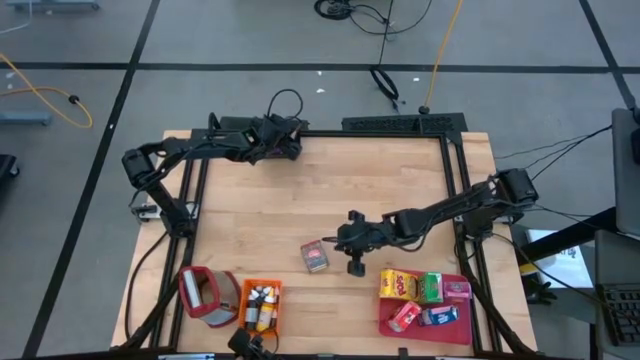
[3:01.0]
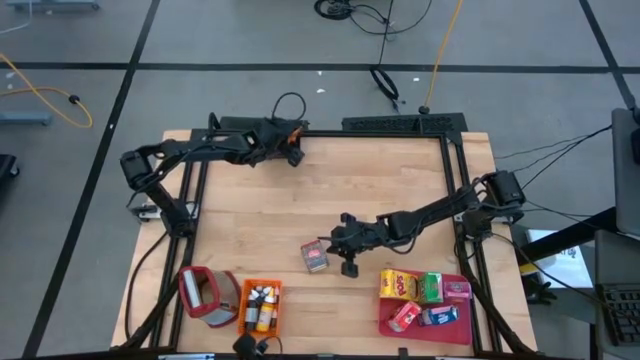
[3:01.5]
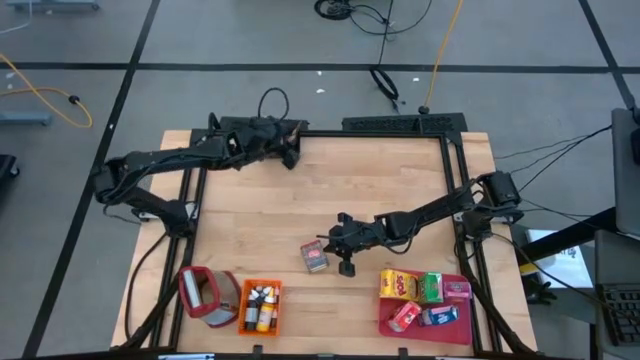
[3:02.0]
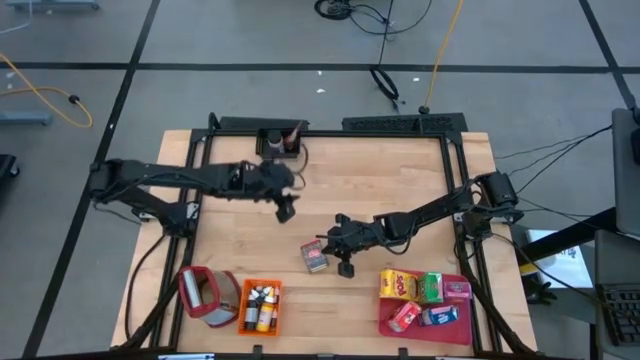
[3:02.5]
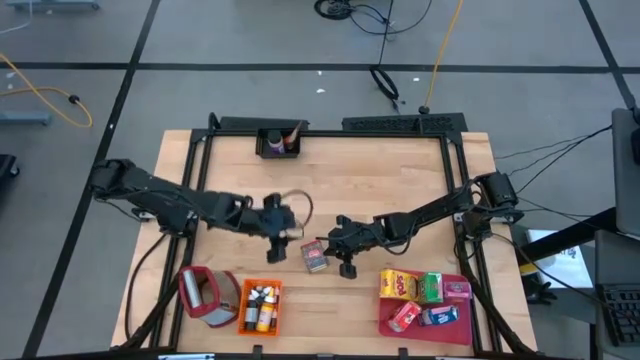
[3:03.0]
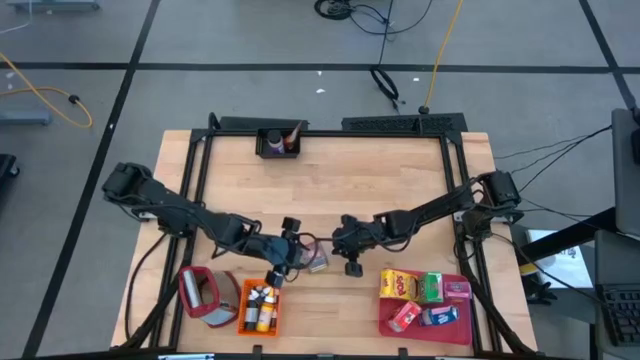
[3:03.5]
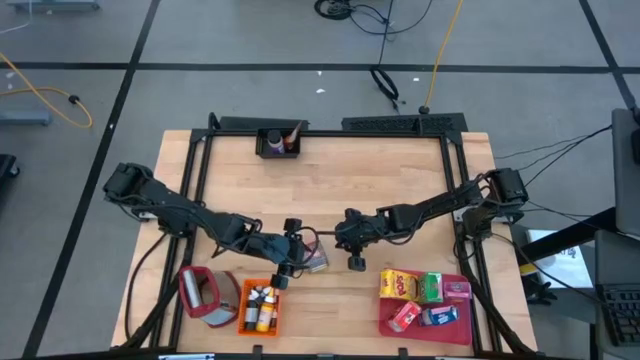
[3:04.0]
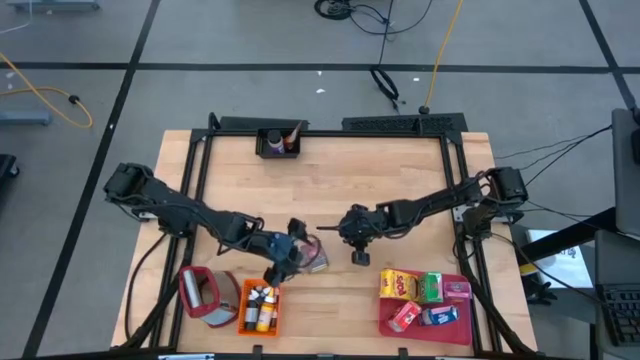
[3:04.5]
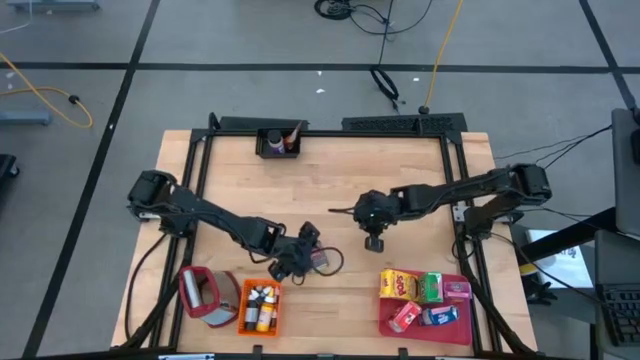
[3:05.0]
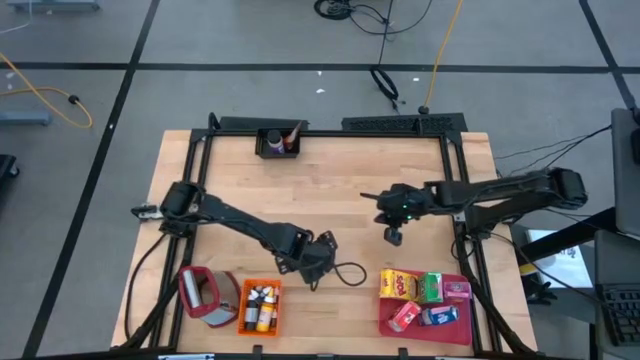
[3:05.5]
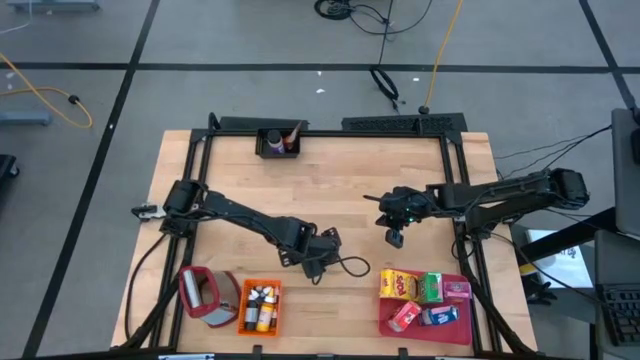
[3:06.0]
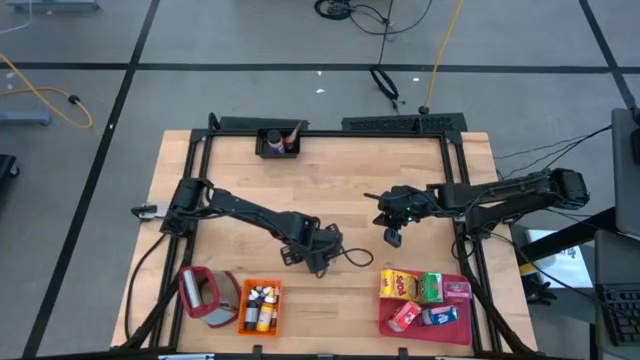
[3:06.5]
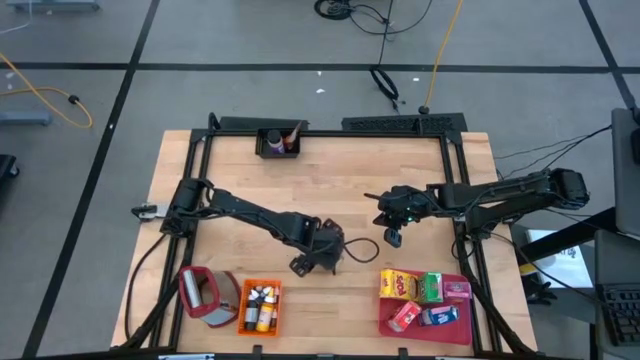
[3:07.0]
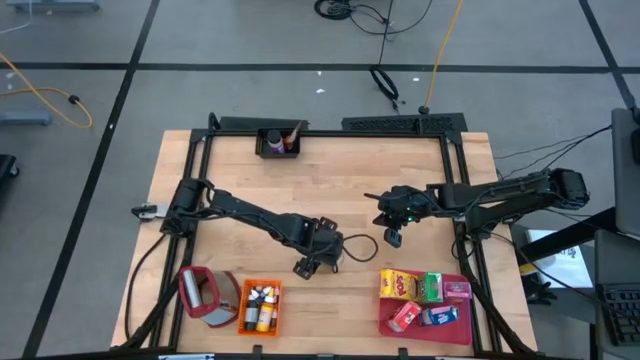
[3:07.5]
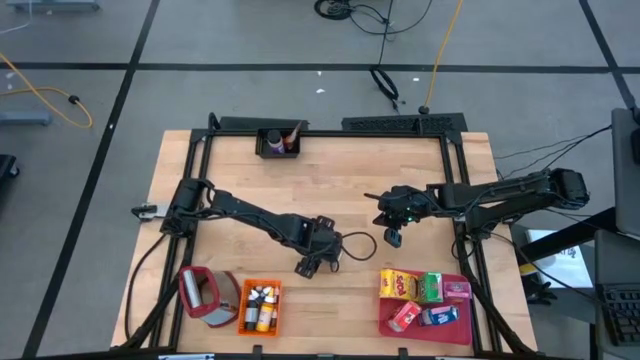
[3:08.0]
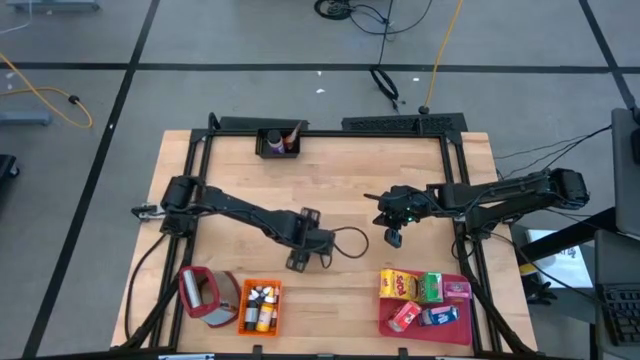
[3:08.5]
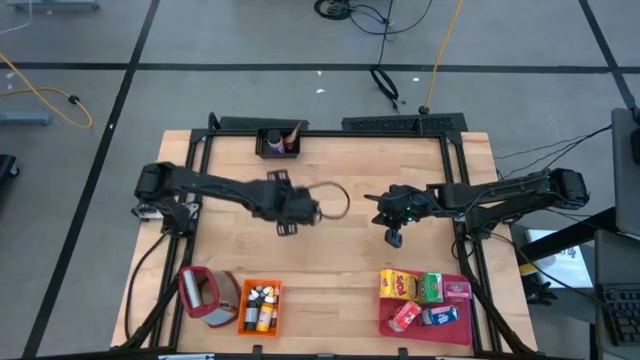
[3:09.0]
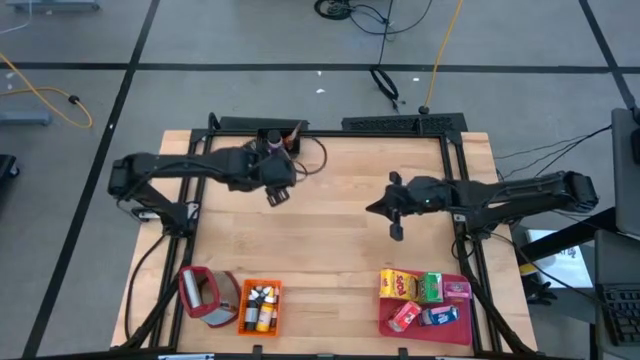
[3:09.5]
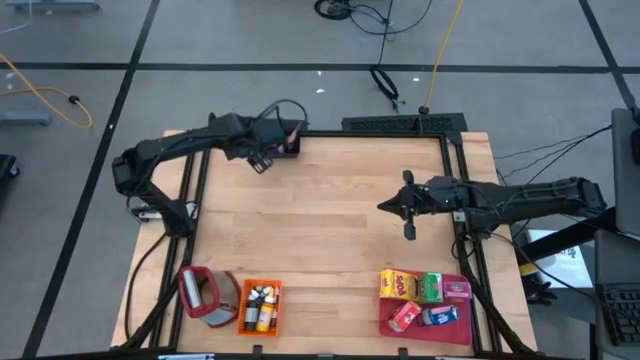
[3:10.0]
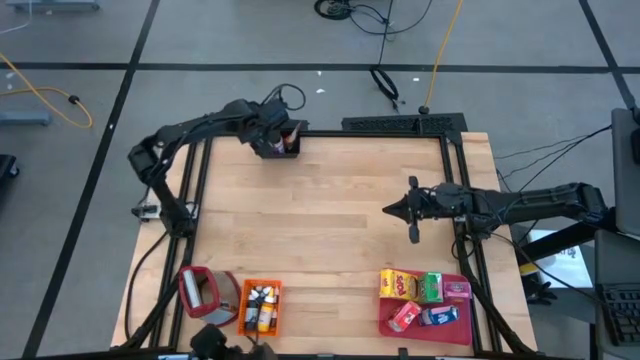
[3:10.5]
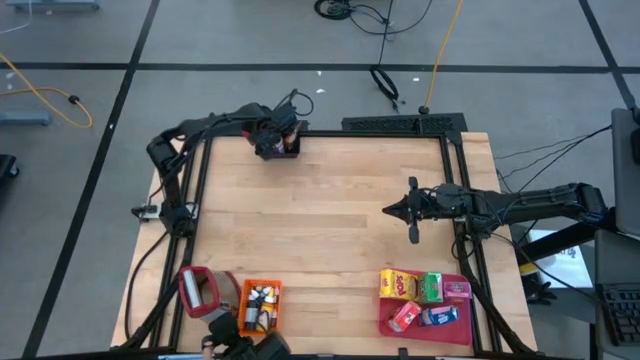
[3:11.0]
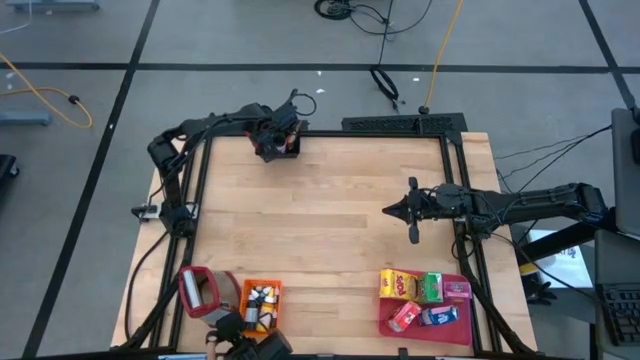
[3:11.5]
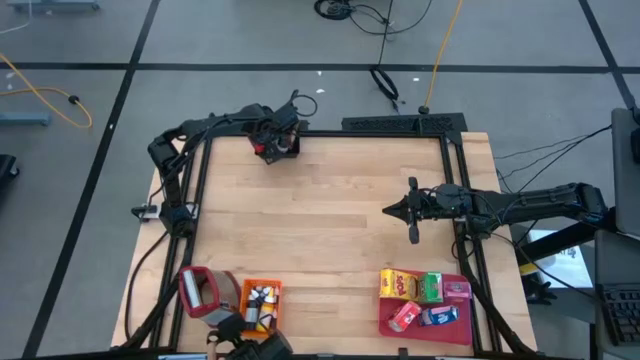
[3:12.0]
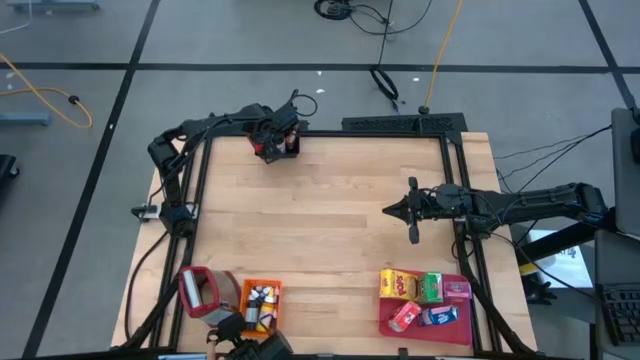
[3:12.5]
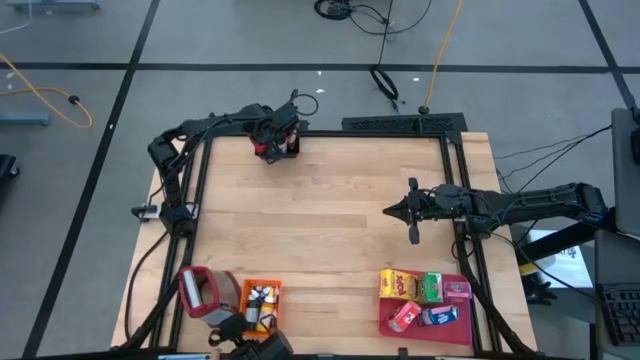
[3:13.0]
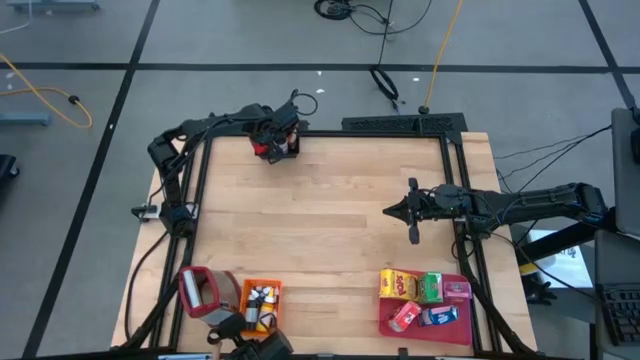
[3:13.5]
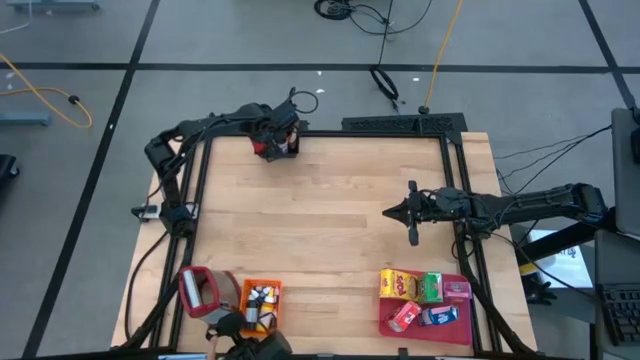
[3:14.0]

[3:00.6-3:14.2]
Task: Pick & Place Kitchen Items
Put the red seasoning can into the black bin

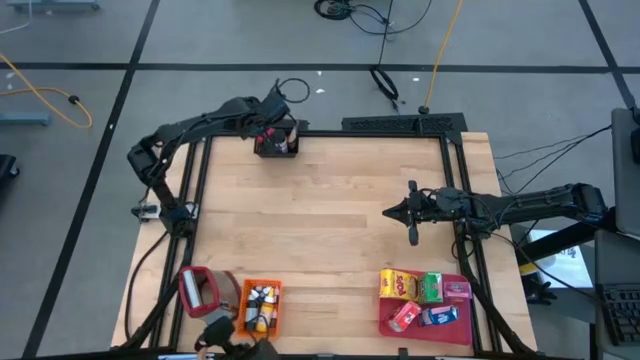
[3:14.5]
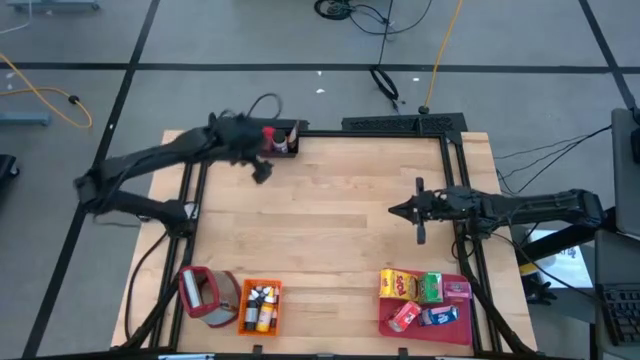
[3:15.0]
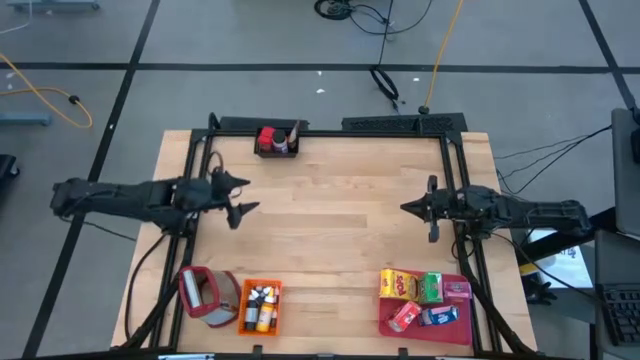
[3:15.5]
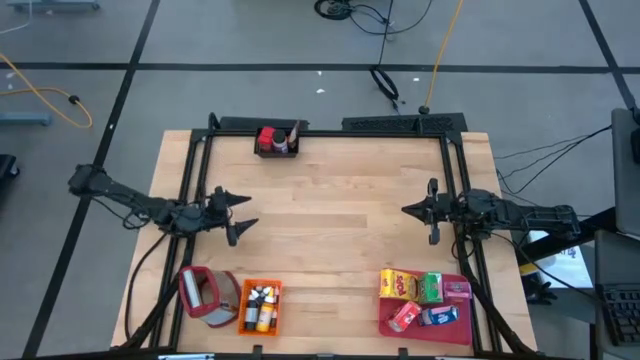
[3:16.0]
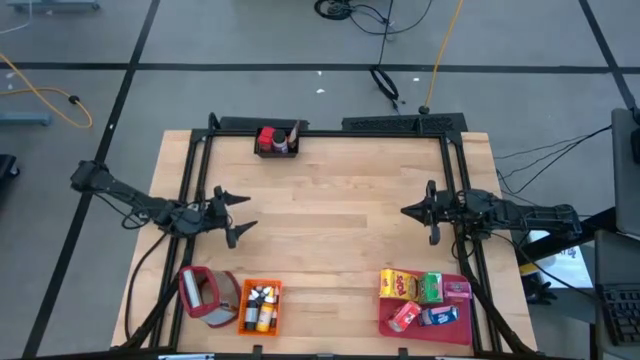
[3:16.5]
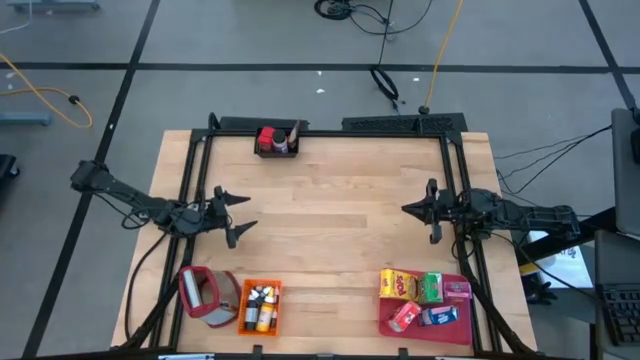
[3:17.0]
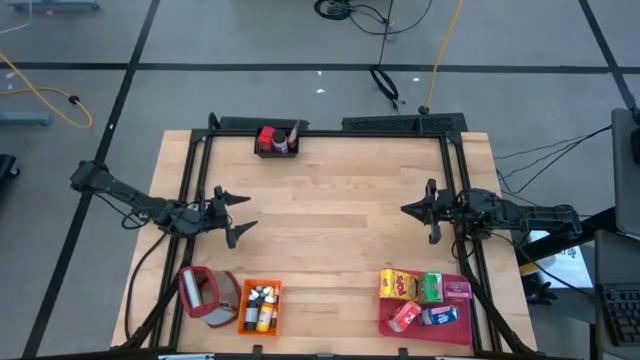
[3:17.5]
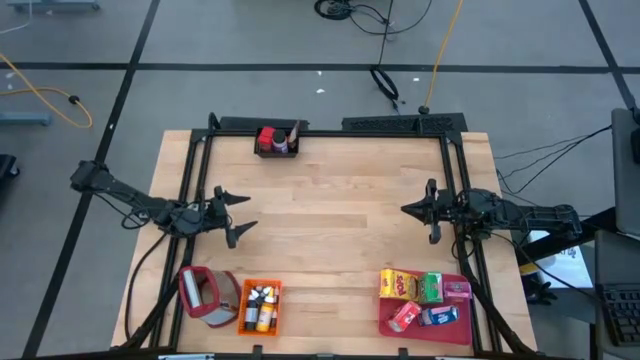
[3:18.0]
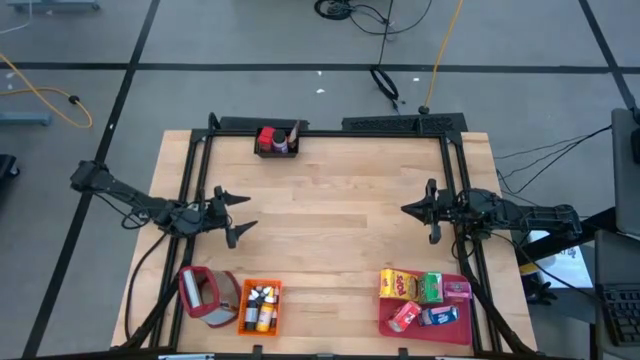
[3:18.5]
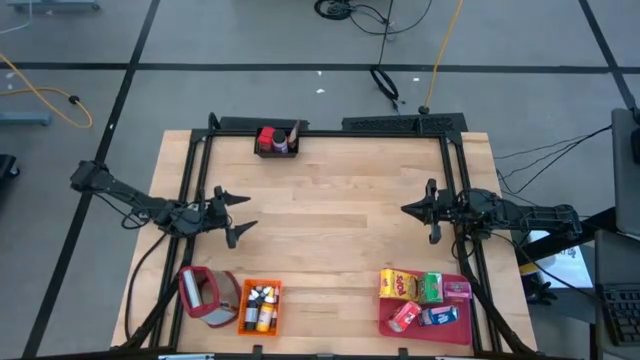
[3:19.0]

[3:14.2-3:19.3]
Return to Home Position

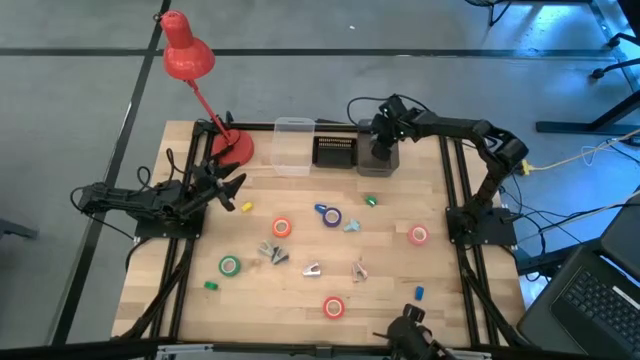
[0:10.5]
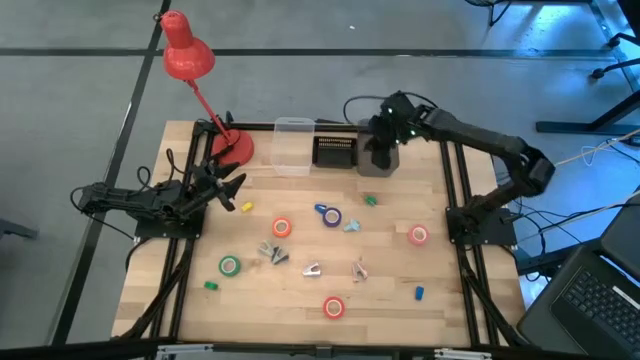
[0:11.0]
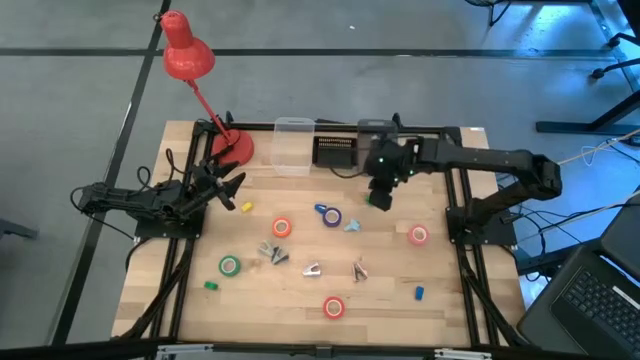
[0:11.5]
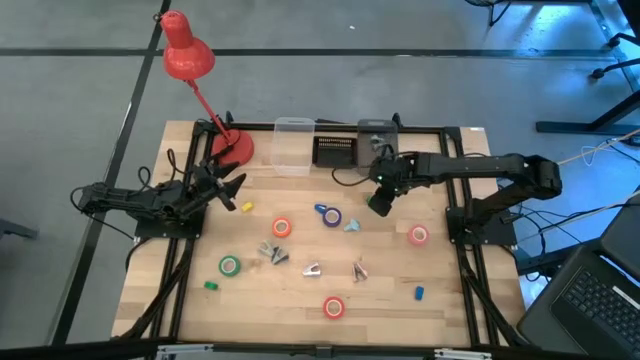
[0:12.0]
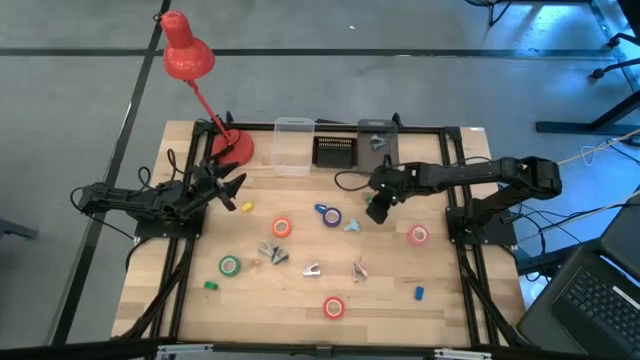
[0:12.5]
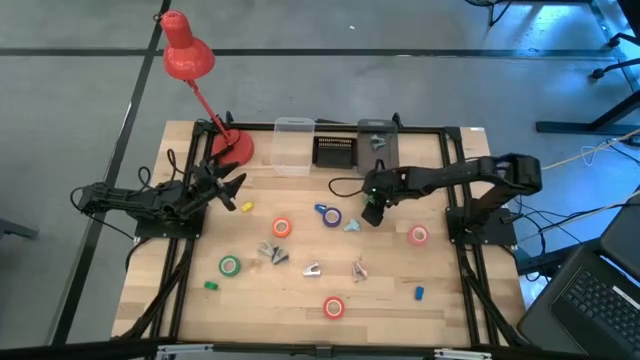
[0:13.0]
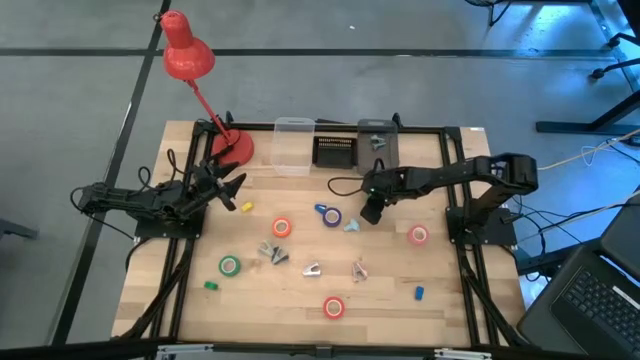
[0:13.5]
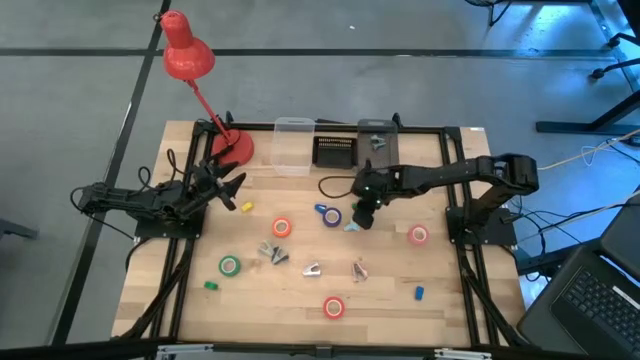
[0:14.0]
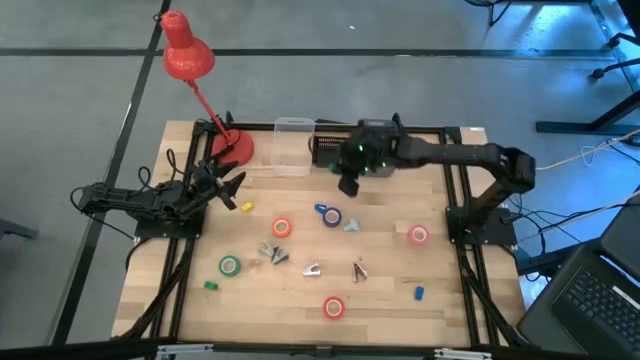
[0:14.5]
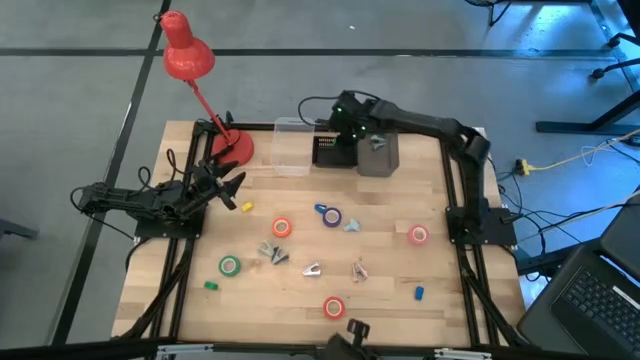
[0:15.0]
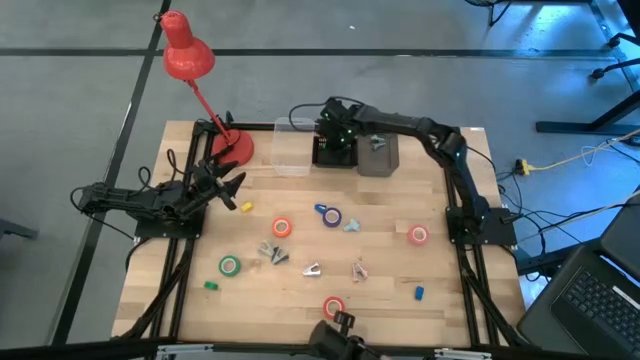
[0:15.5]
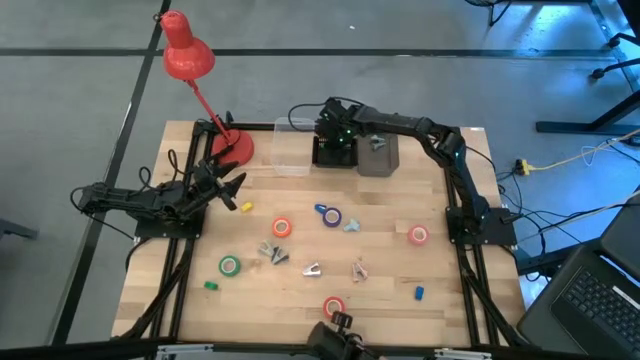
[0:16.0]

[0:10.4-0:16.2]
Task: Pick and place Stapler, Stapler remover, tape
Put the green stapler into the left black bin
